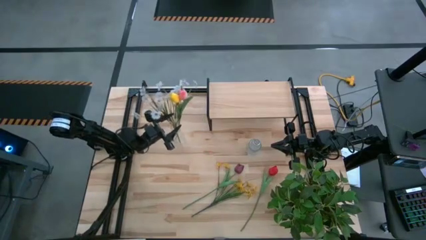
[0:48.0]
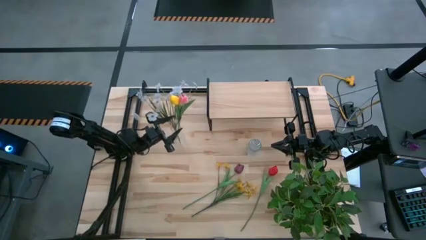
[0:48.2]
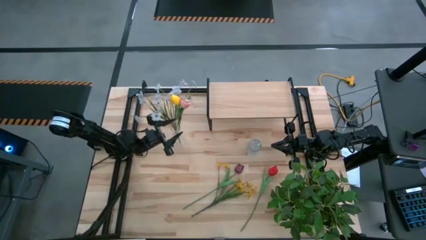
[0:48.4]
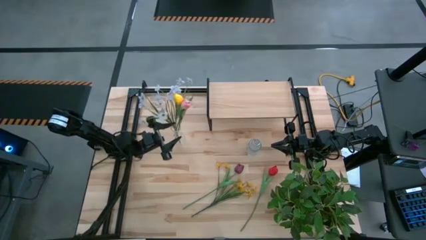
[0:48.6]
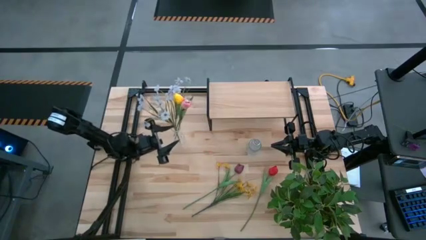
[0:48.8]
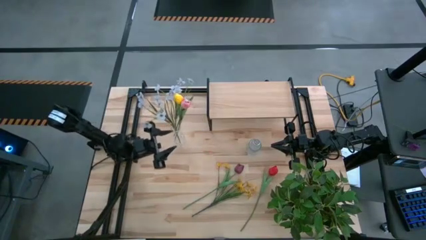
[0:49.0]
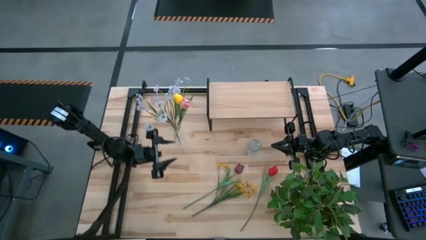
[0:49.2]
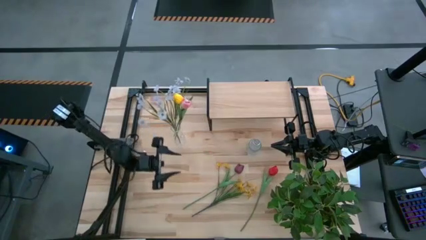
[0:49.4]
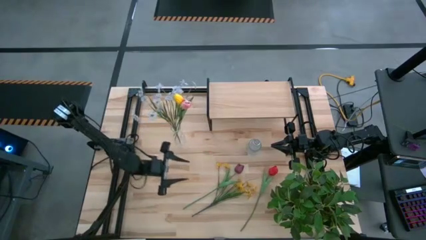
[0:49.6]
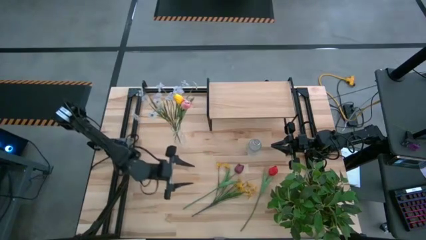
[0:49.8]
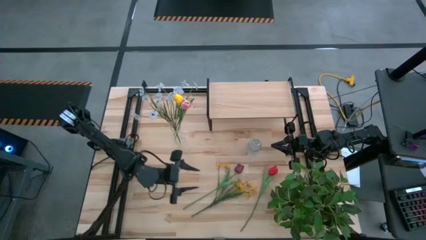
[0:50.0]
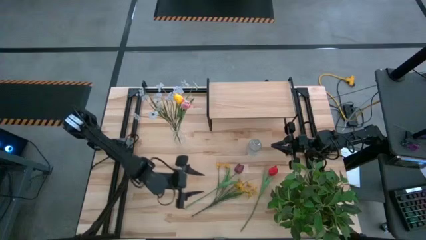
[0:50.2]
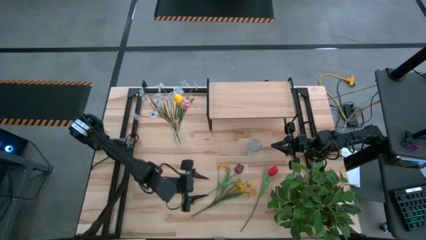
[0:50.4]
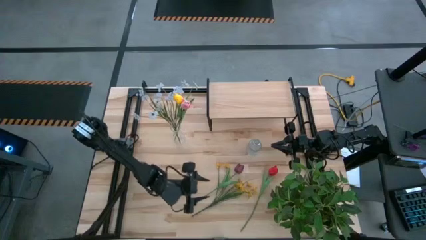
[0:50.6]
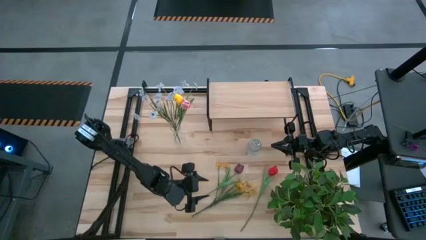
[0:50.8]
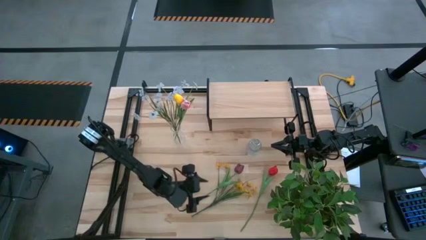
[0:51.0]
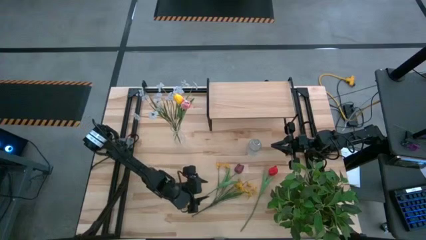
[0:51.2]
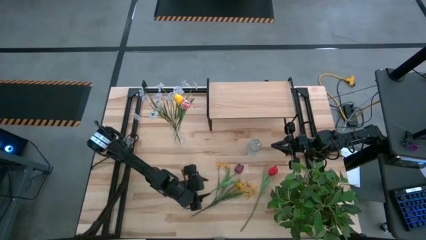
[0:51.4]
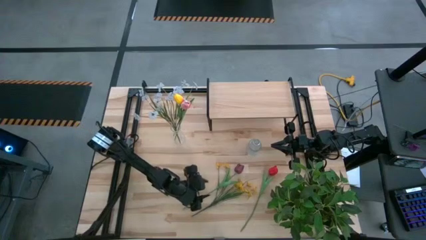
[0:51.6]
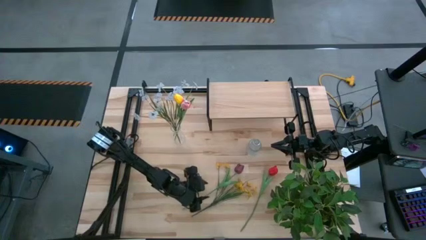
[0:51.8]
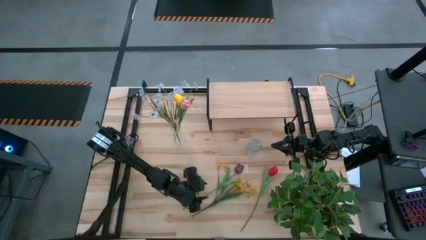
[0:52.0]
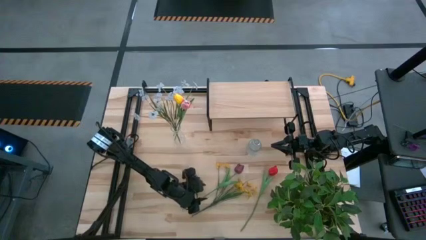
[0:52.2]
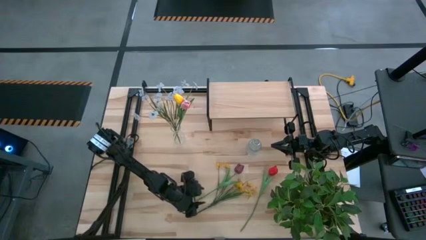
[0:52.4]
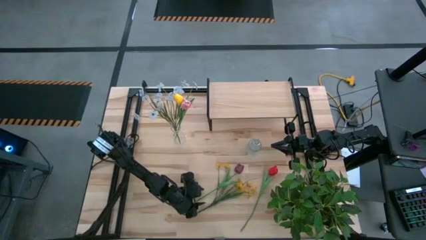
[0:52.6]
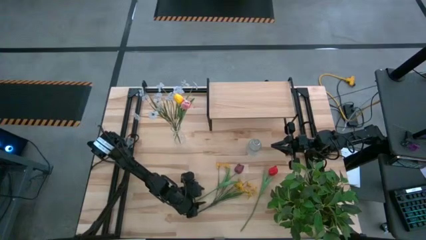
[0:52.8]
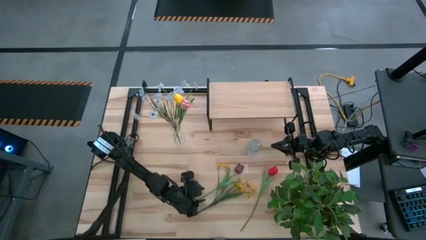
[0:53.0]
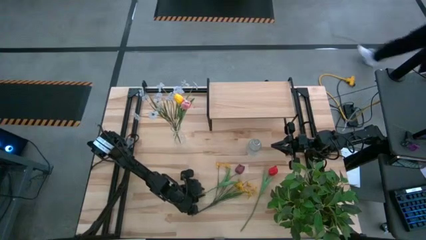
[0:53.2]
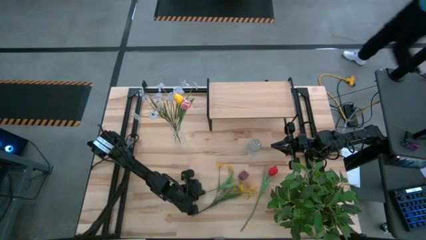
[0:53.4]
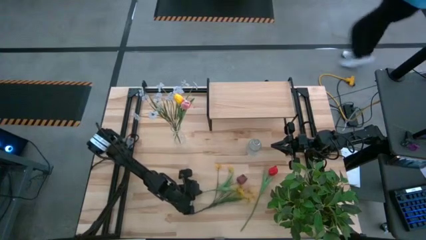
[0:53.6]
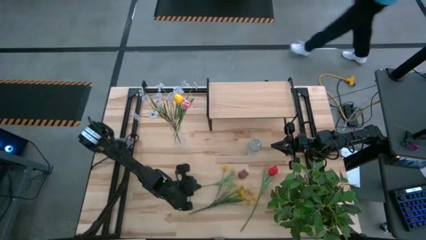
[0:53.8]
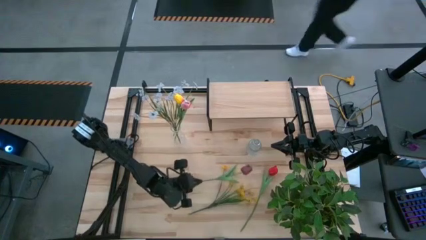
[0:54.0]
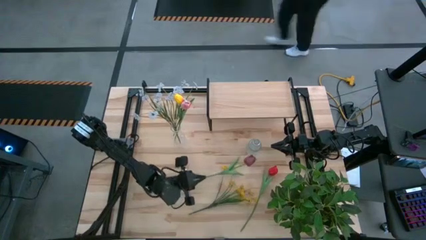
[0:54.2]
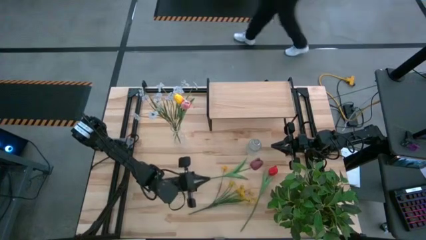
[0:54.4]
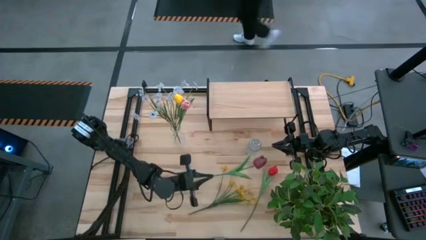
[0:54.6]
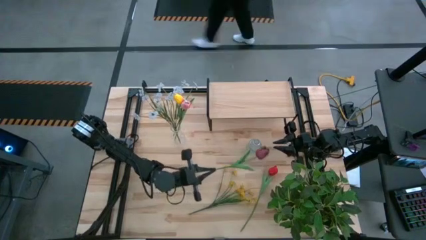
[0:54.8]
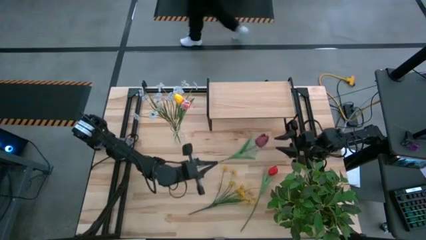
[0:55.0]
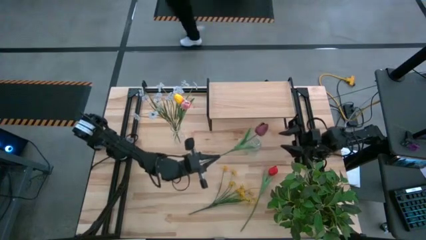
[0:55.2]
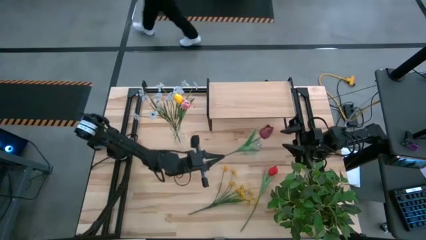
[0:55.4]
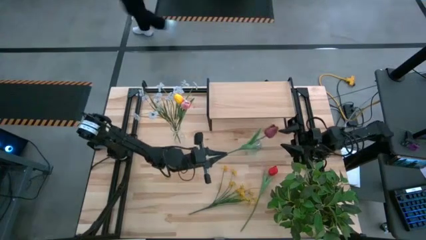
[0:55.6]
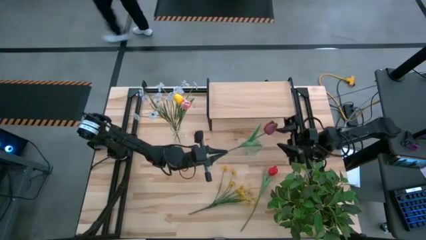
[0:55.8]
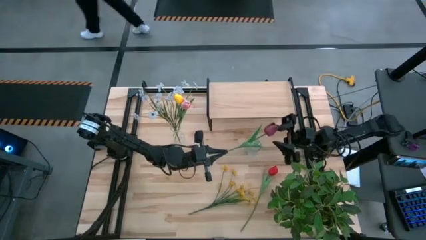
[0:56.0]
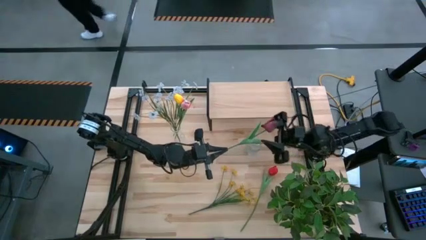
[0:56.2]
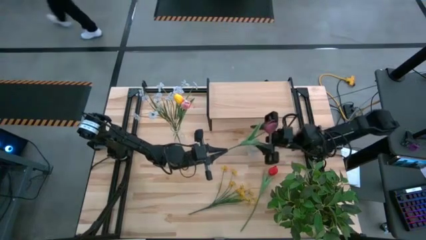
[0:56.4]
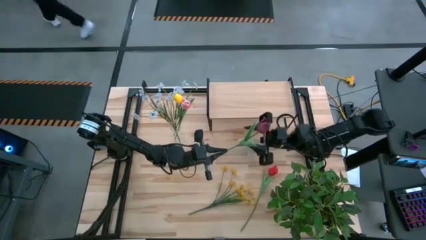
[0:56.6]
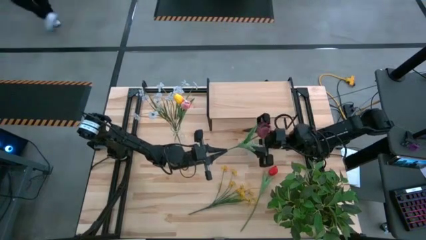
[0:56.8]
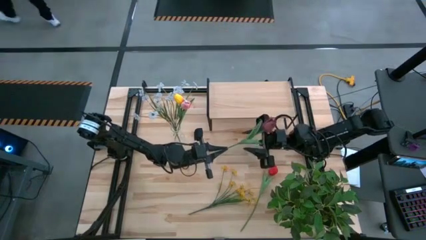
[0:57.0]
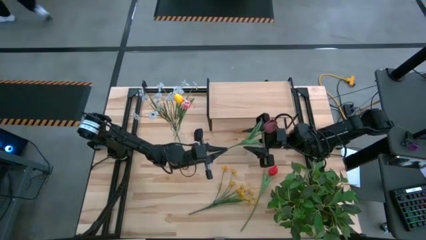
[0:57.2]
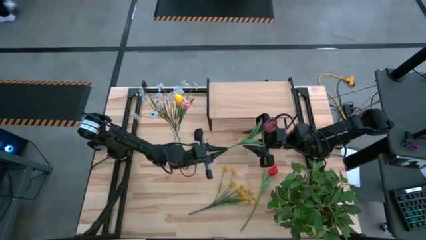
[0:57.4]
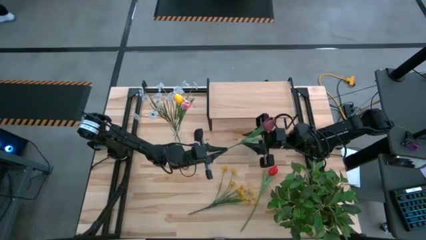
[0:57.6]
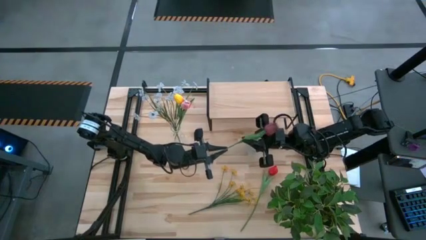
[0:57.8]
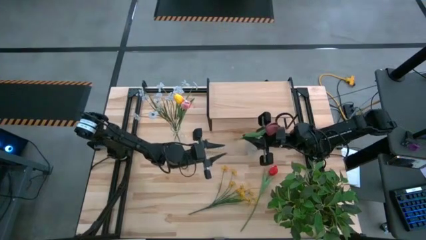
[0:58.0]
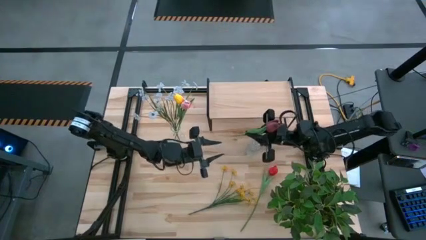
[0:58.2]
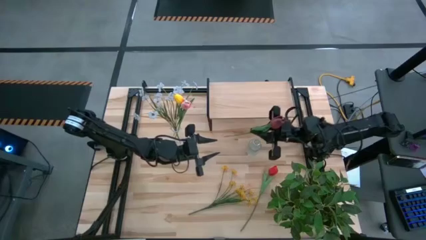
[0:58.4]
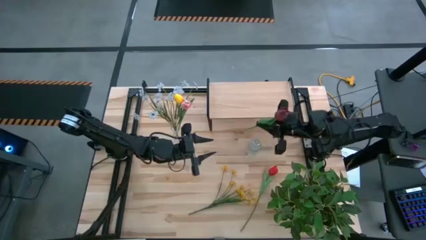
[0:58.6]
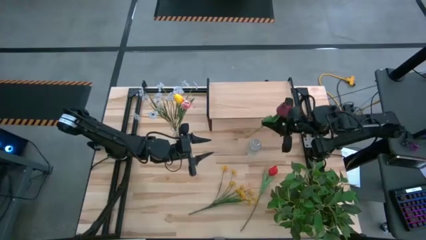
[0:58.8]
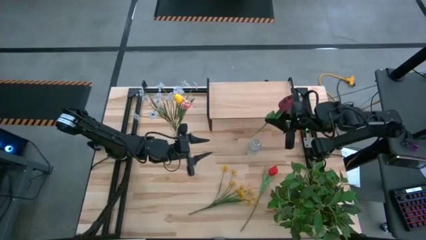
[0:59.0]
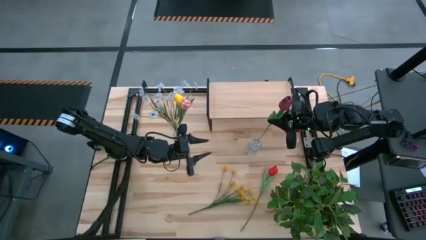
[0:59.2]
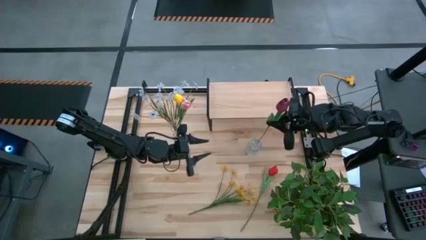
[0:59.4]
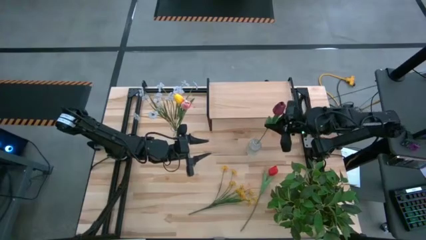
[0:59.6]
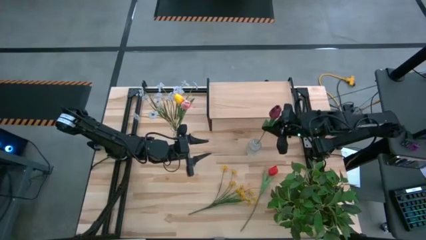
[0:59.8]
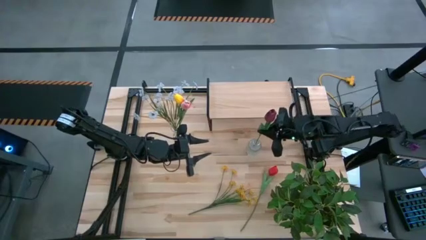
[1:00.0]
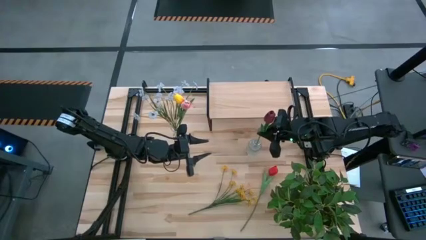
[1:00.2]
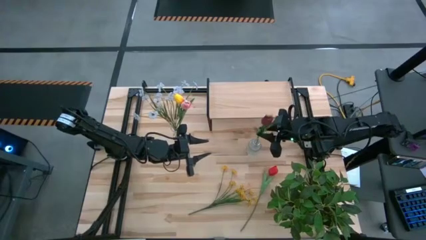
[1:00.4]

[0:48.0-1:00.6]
Task: Pick and place flowers into a vace then onto a shelf
Put the dark red flower into the right transparent vase

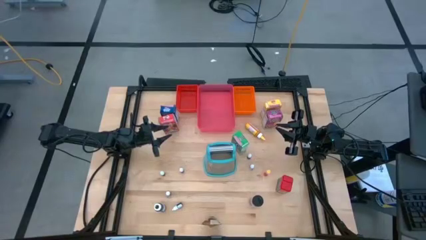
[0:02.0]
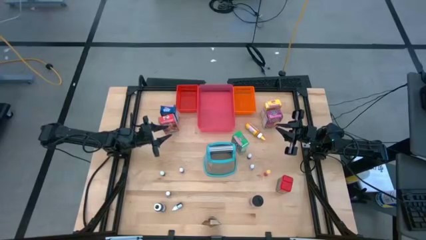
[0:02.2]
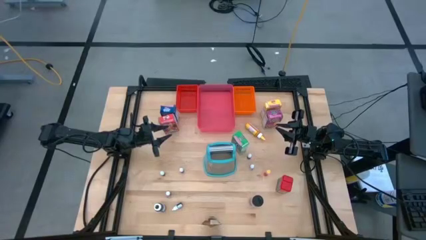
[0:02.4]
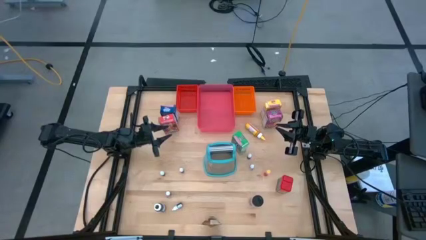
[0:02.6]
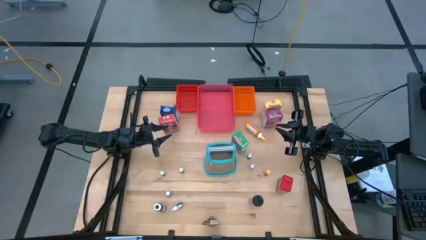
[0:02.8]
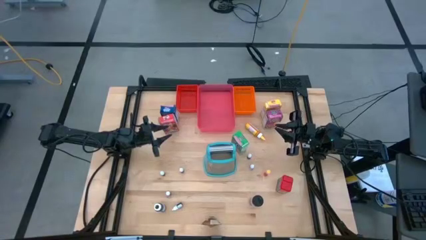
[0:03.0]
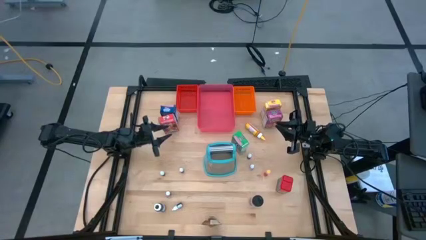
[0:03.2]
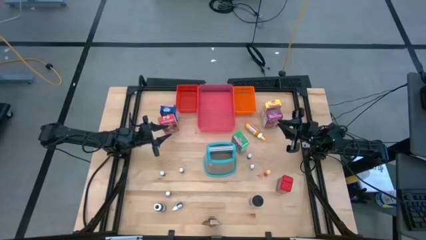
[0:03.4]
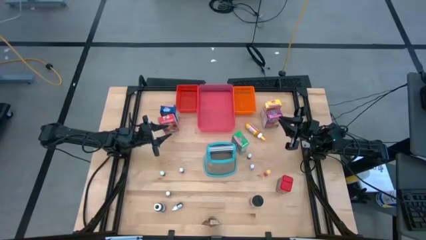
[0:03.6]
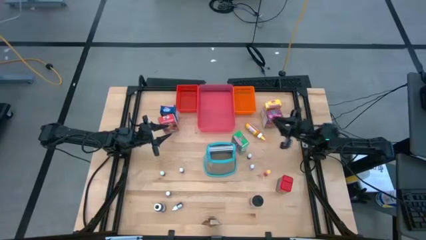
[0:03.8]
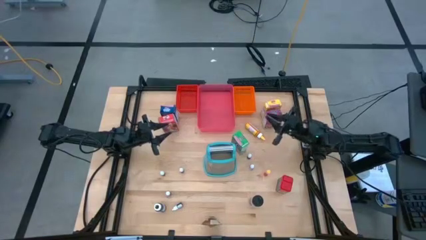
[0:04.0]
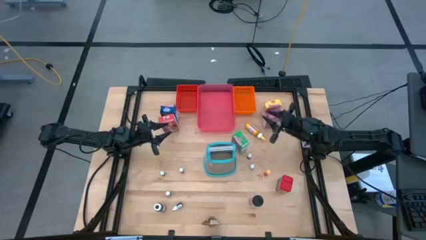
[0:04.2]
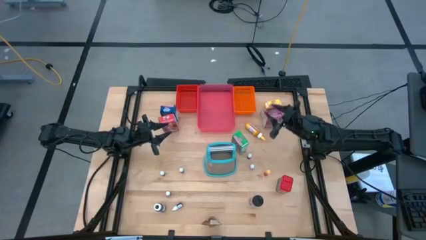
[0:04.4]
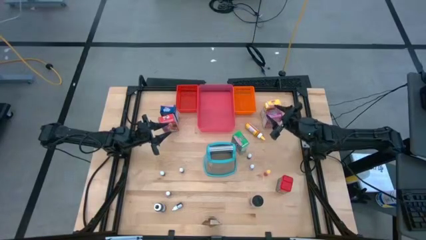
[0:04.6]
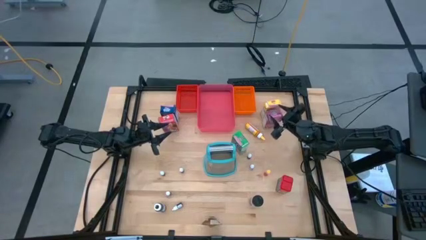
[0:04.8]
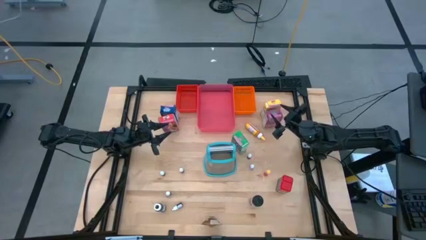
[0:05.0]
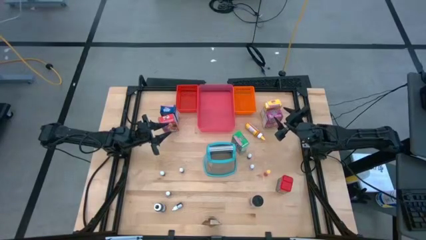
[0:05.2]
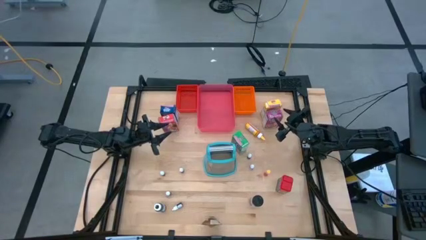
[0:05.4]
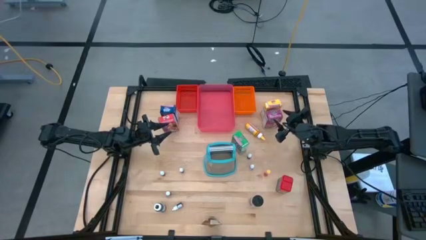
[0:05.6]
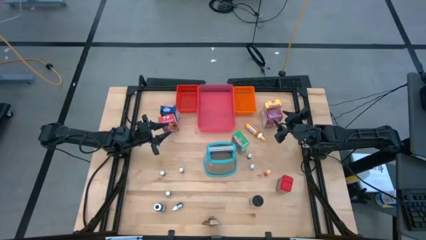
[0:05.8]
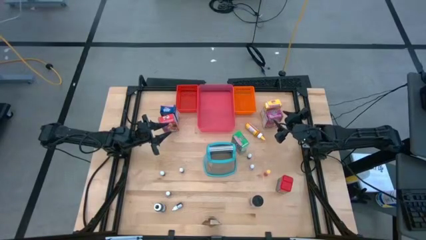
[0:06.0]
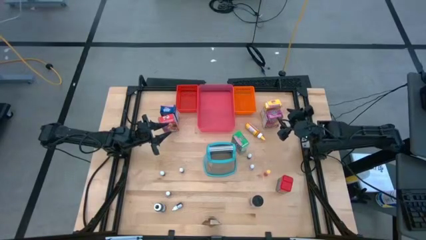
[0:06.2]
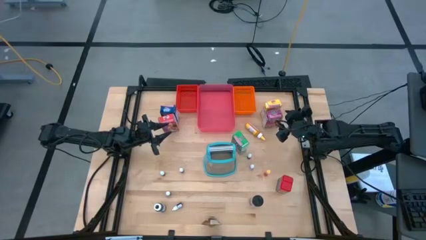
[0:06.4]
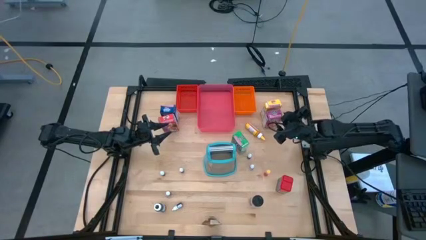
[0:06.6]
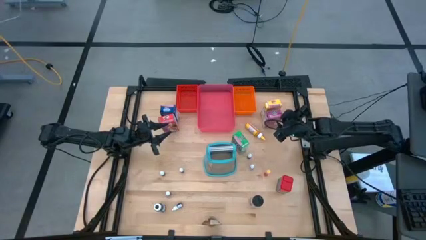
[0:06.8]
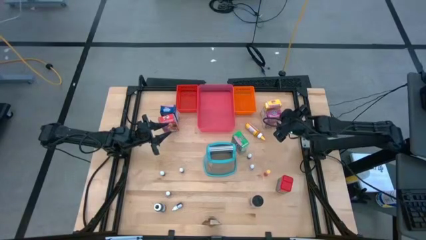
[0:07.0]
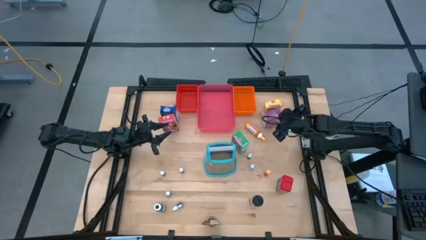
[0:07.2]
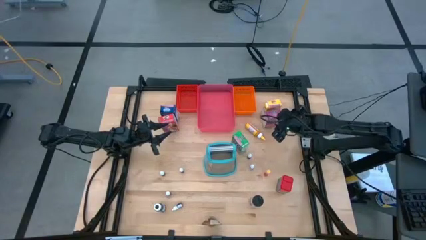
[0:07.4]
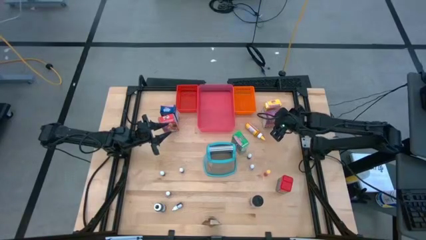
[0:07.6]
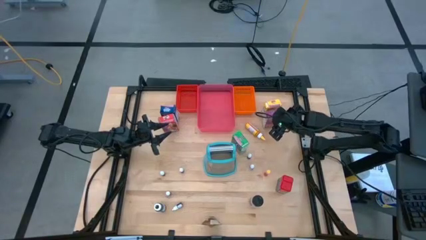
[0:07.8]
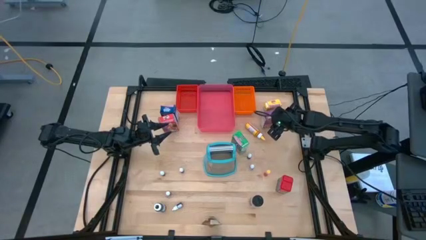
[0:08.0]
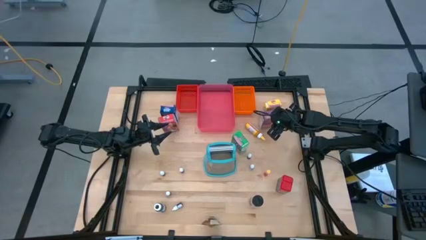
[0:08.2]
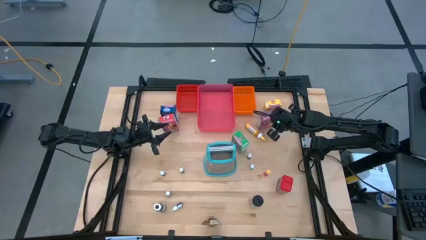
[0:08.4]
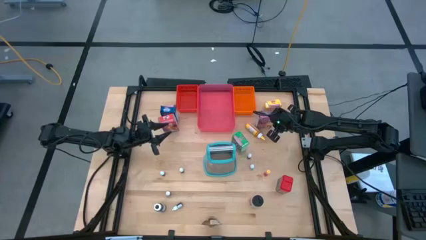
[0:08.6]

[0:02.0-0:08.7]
Task: Pick & Place Kitchen Items
Put the purple cereal box into the pink bin
